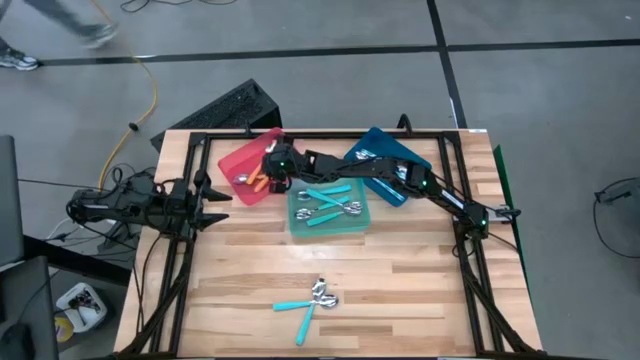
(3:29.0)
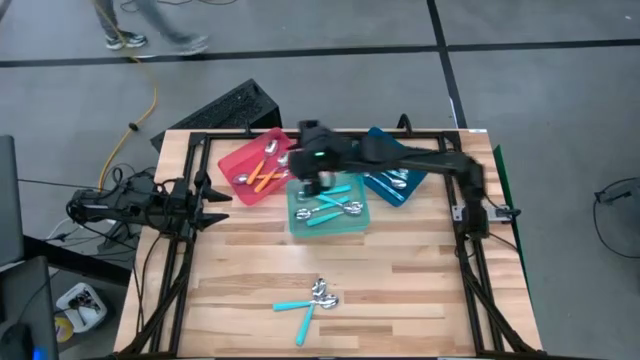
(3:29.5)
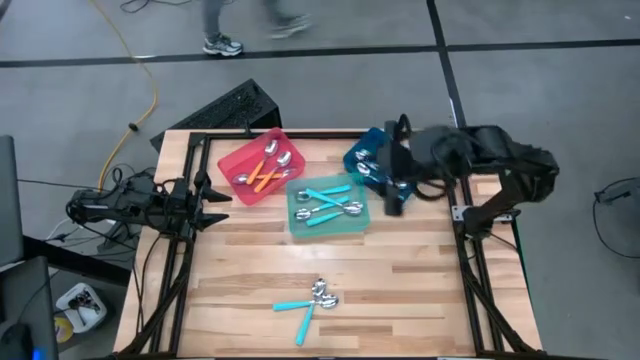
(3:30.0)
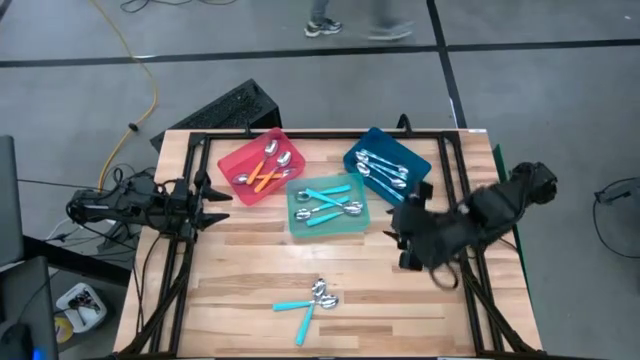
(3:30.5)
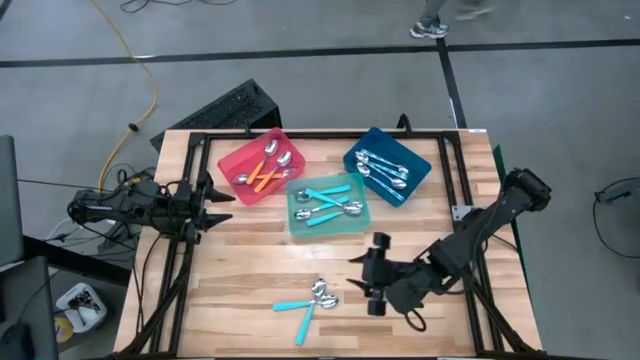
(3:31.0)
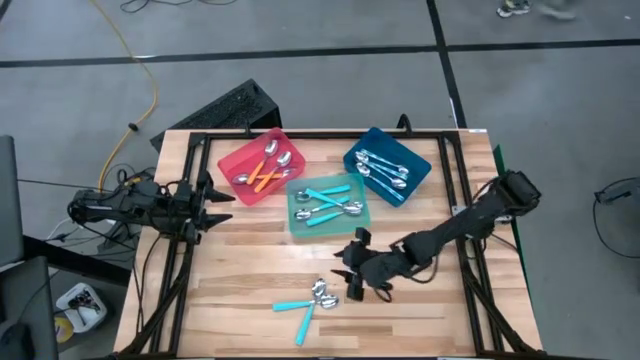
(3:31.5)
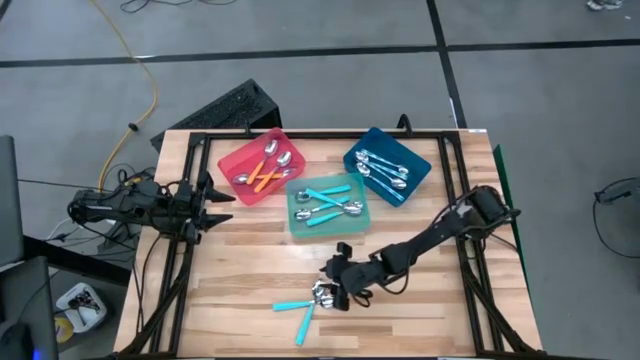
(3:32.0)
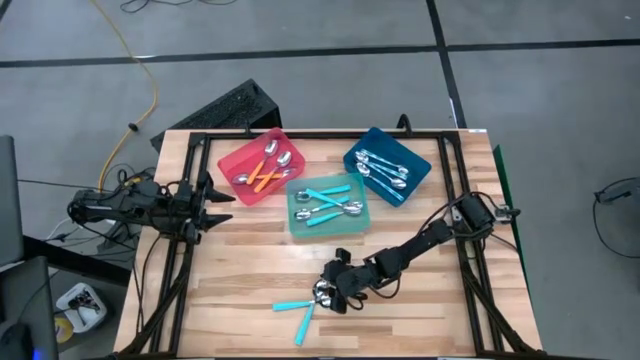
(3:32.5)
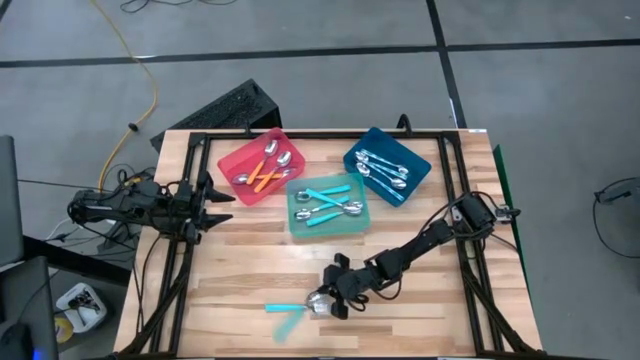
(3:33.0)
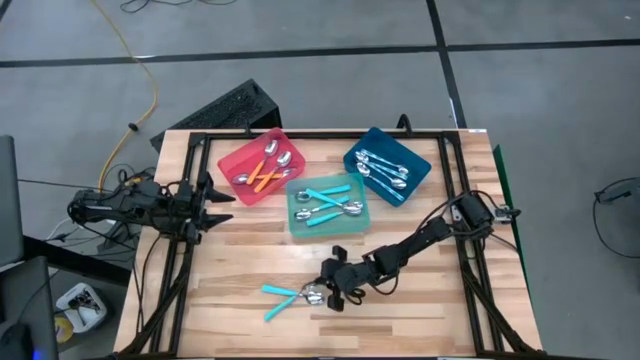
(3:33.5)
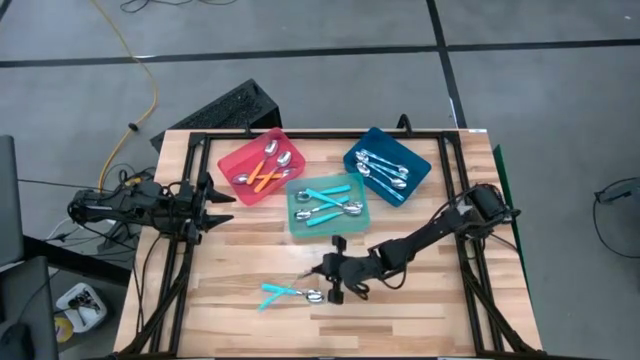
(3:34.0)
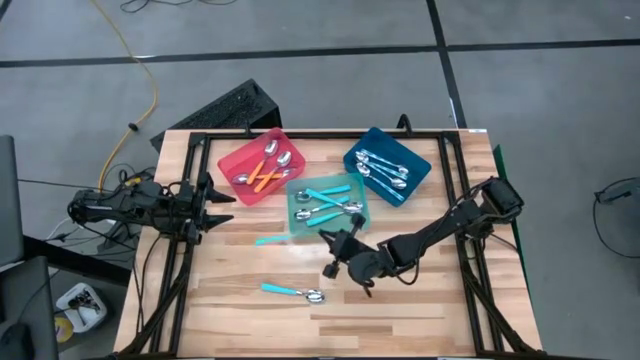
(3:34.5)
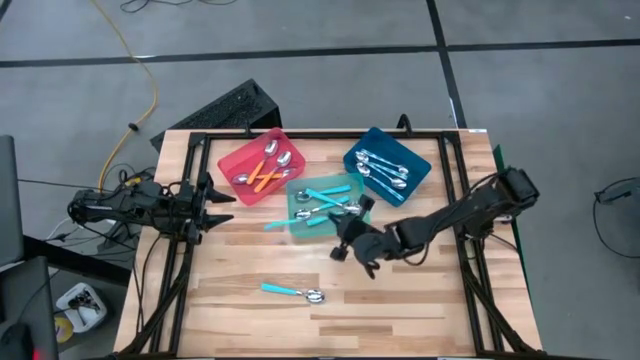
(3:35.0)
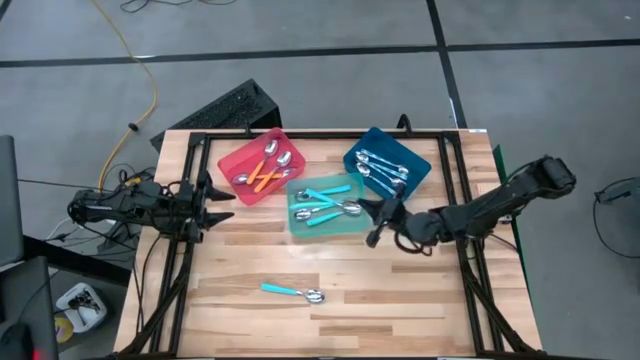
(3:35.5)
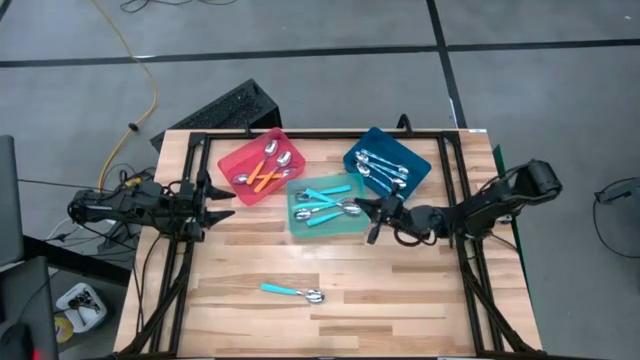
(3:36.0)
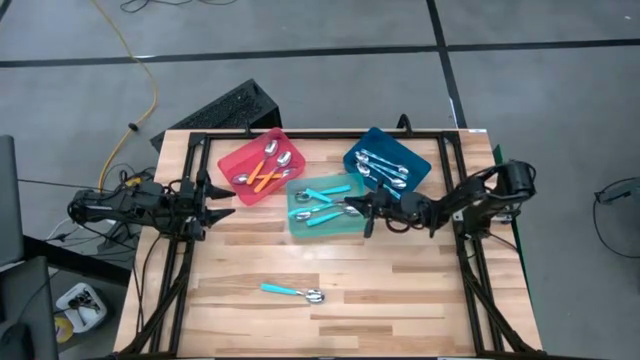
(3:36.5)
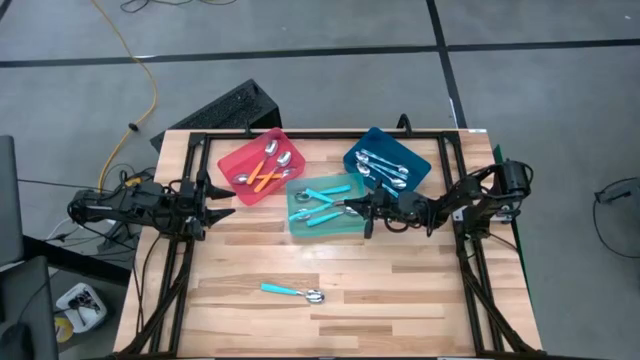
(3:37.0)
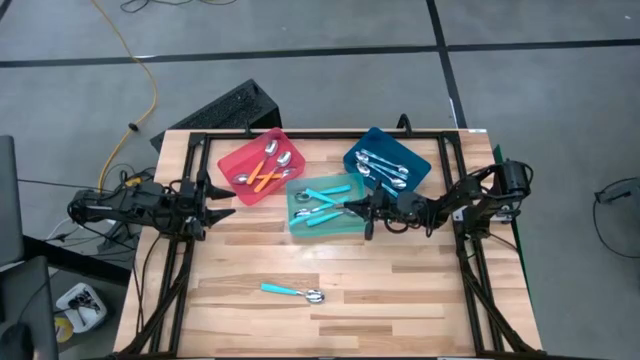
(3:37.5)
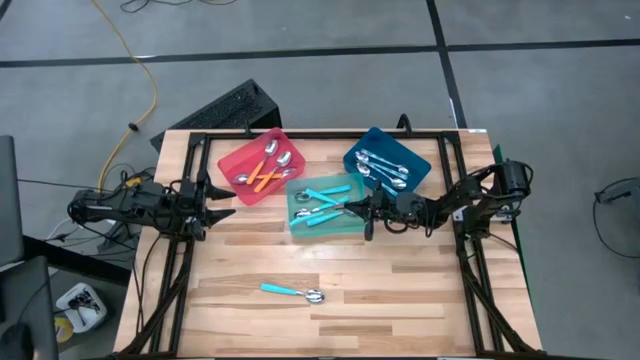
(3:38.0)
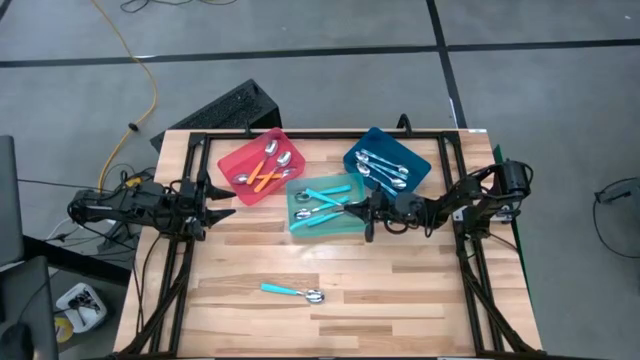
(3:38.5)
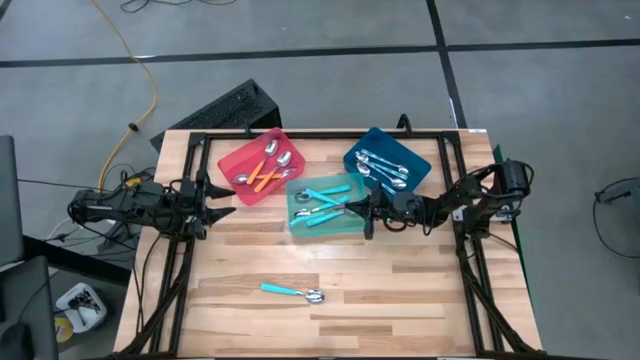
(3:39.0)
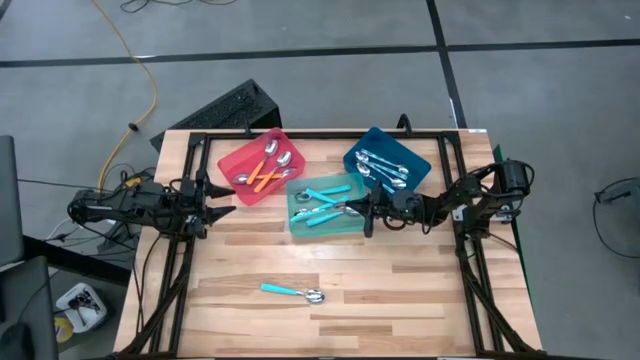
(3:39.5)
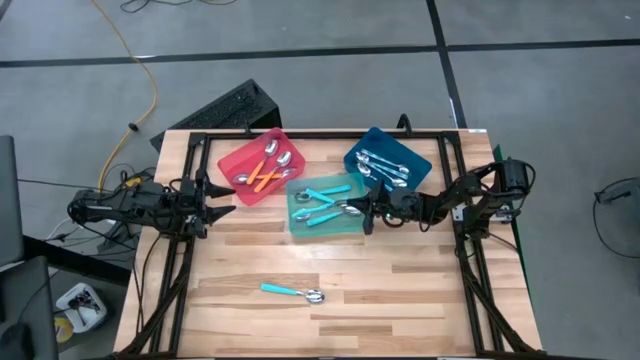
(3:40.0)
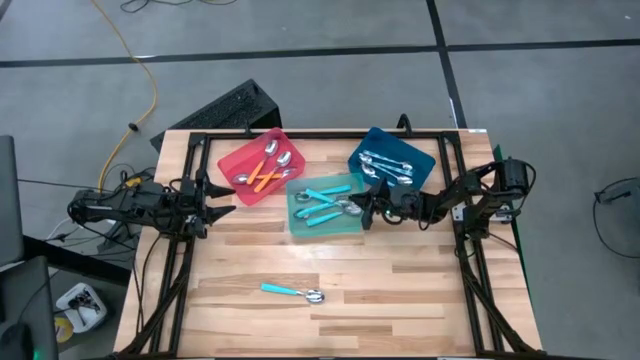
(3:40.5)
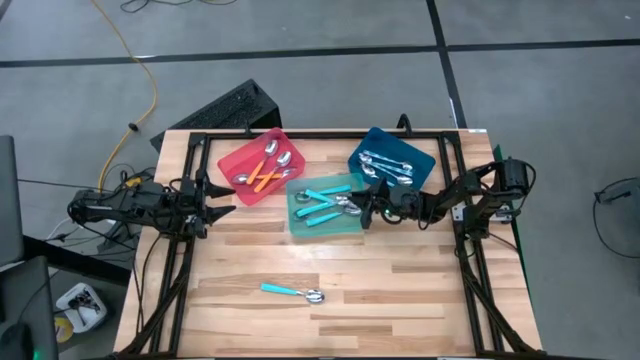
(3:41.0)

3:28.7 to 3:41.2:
Task: Sort silverware by color (type)
Put the top blue spoon into the green bin

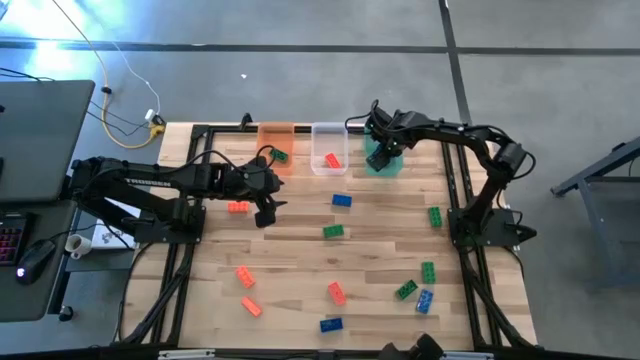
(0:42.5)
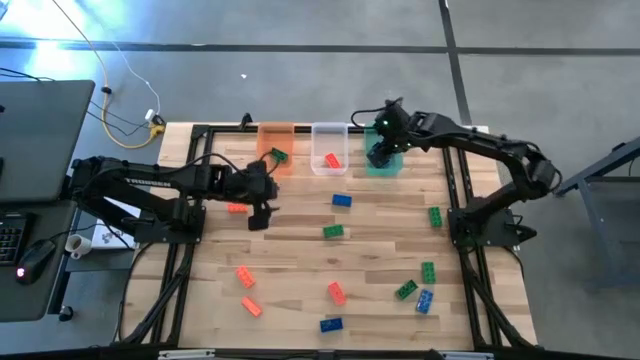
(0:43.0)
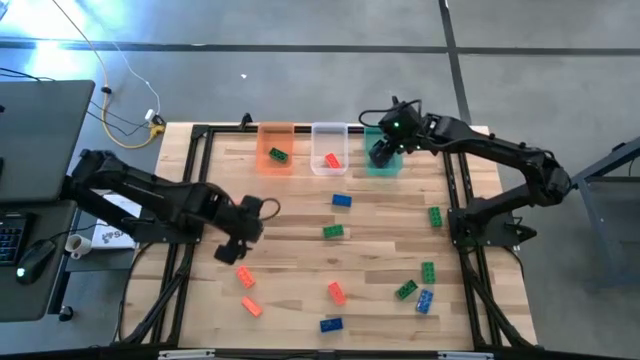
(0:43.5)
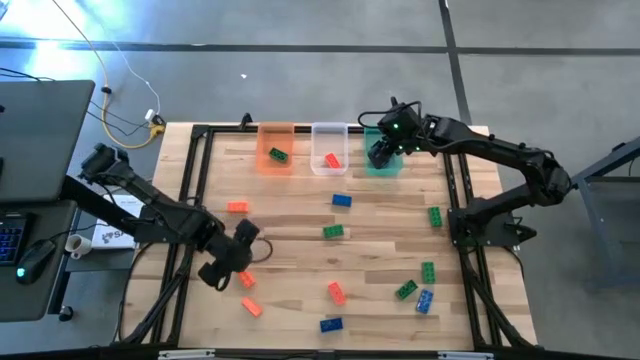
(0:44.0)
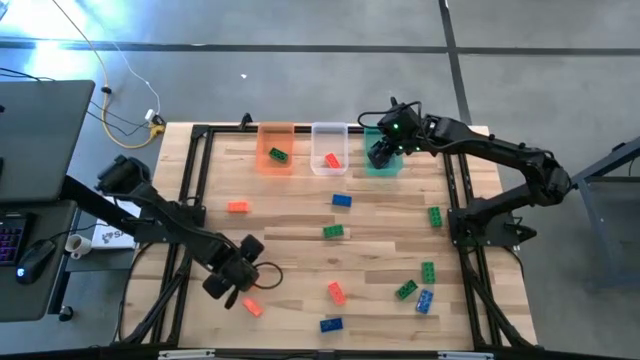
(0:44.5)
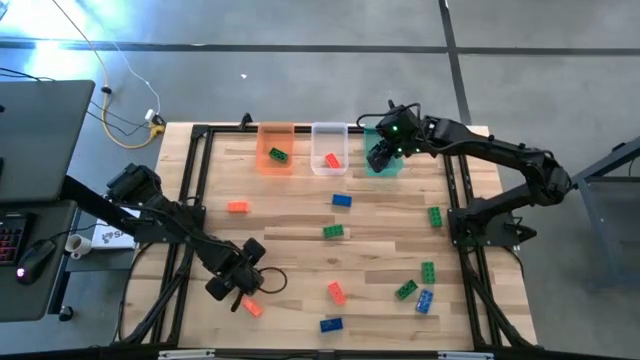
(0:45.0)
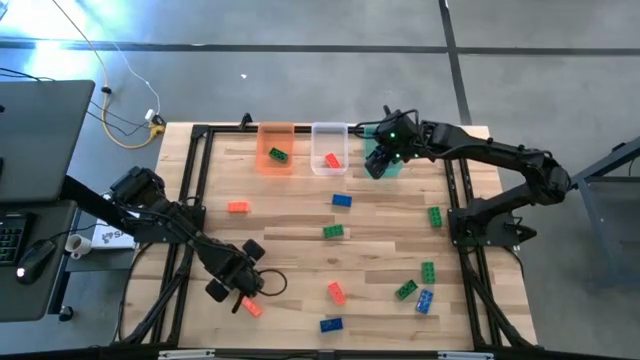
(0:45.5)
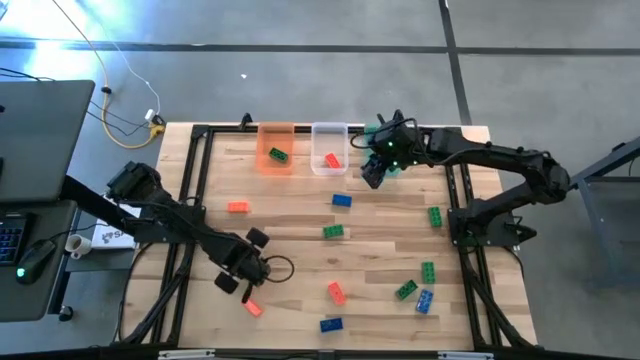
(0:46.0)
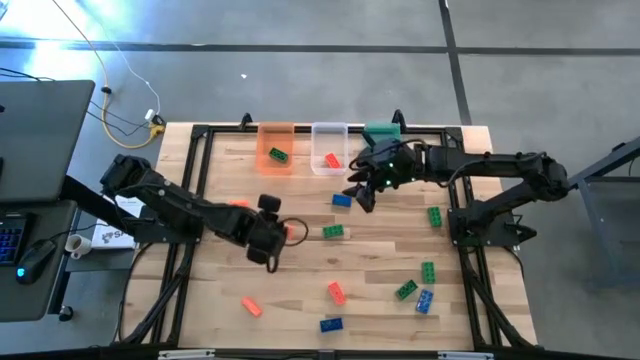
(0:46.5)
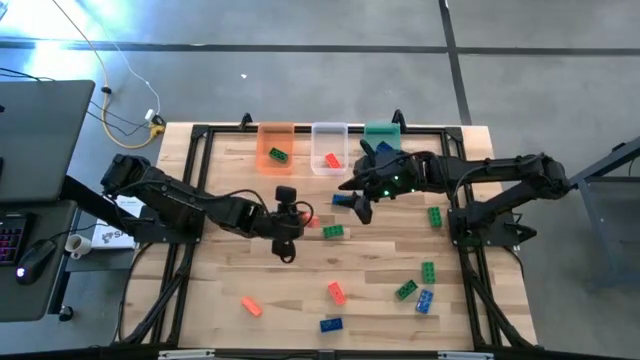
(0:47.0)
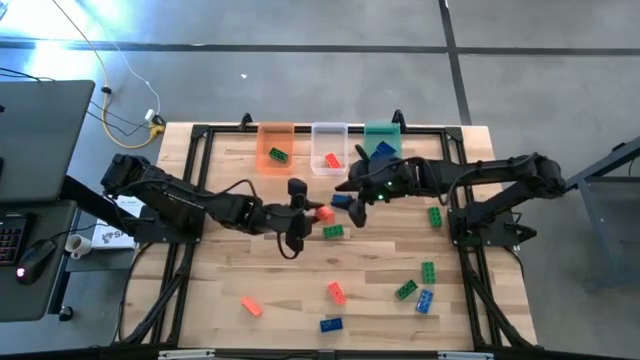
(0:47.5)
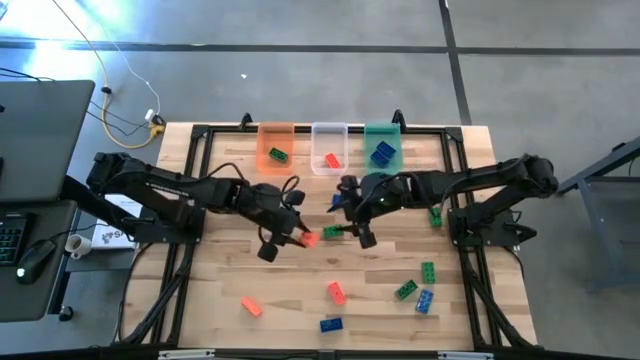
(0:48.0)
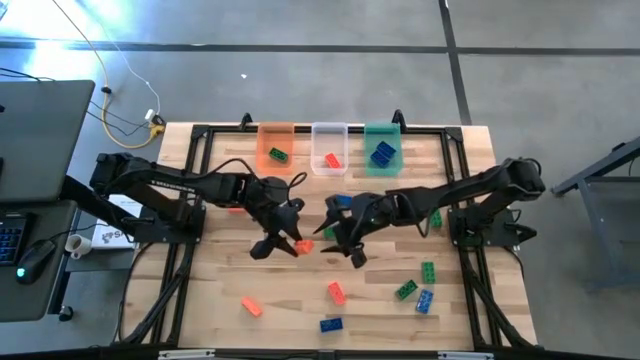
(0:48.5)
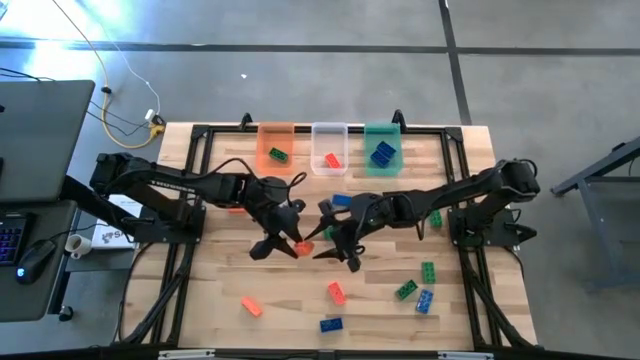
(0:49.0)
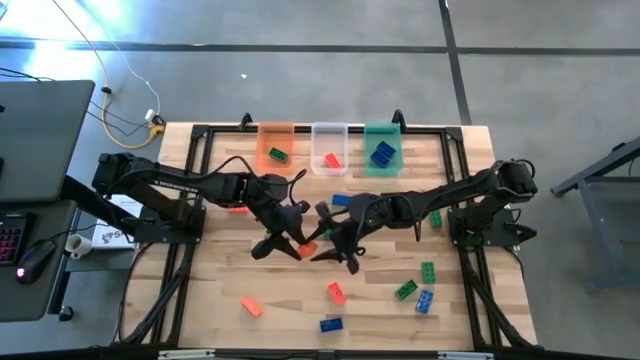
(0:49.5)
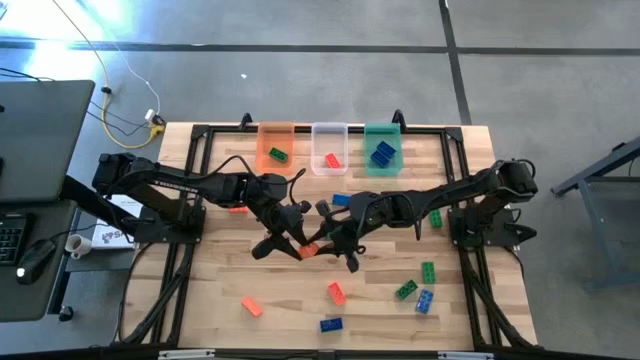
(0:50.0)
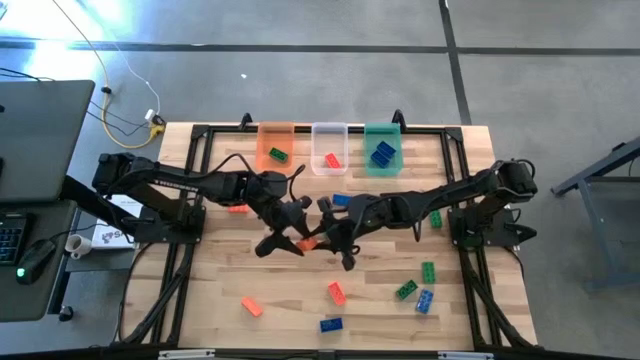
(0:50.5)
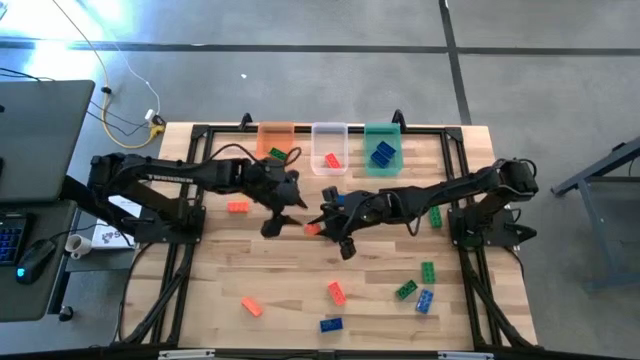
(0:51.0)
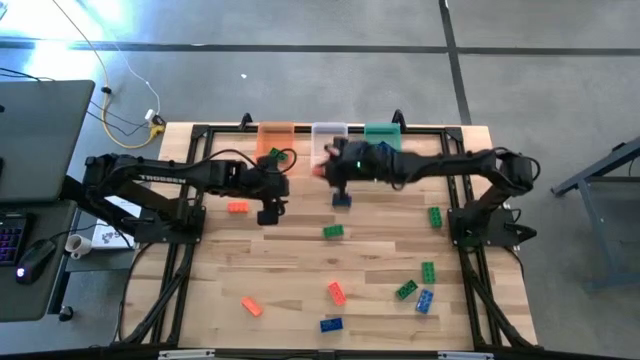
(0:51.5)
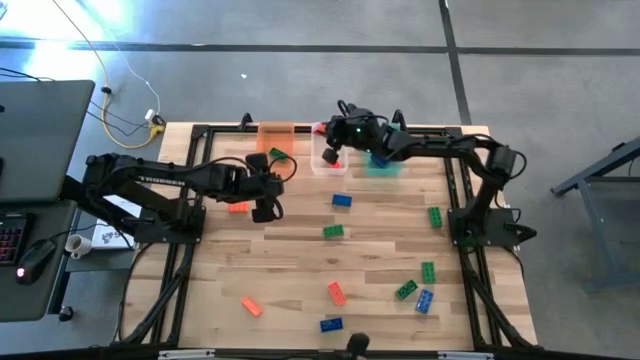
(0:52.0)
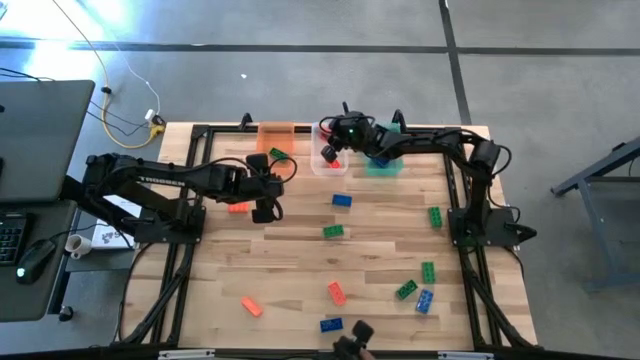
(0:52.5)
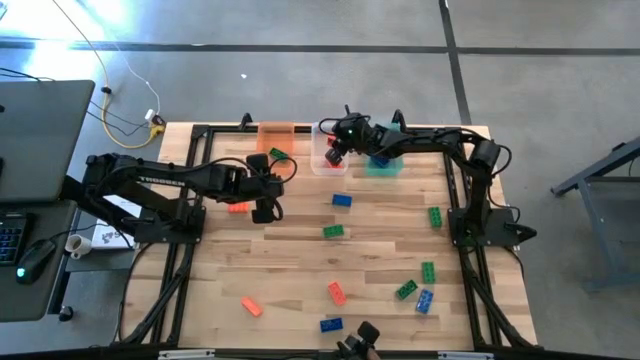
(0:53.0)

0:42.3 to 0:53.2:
Task: Sort & place blocks by color
Put the orange game piece into the transparent bin
